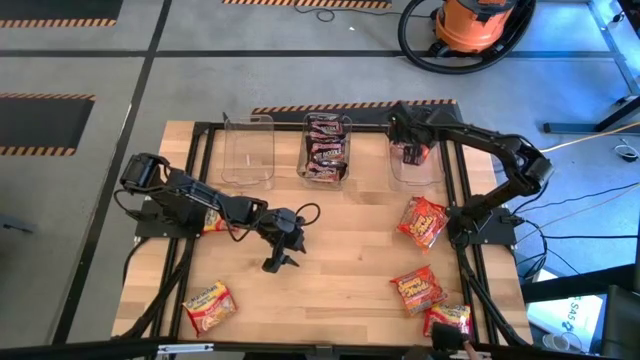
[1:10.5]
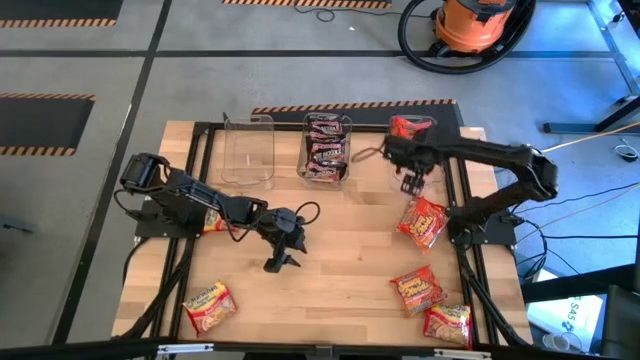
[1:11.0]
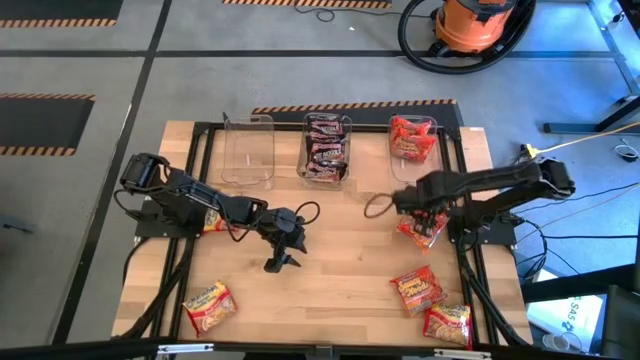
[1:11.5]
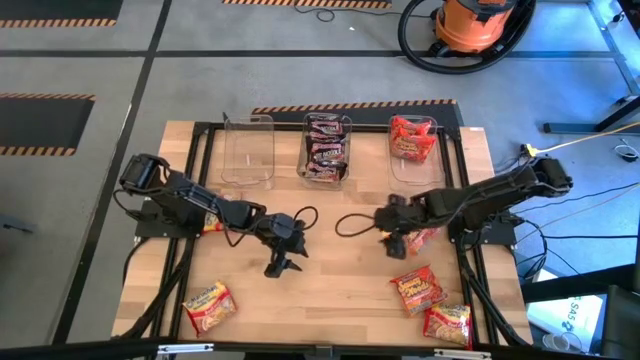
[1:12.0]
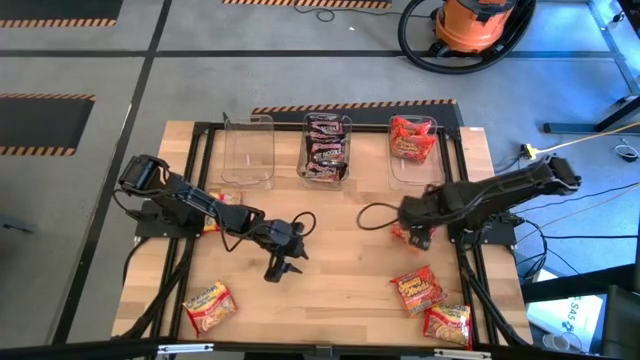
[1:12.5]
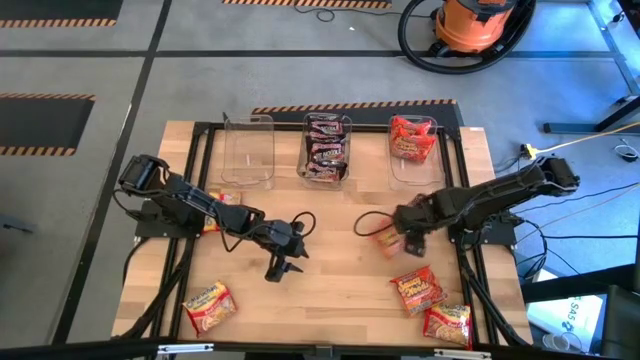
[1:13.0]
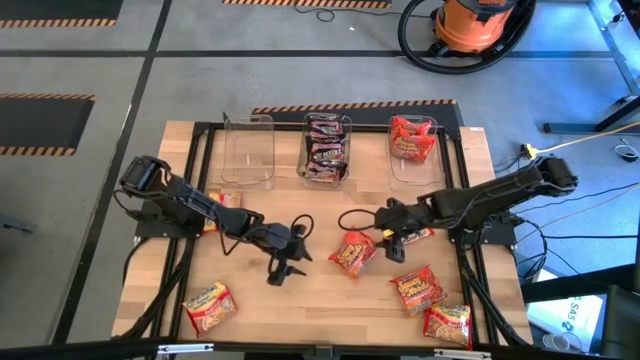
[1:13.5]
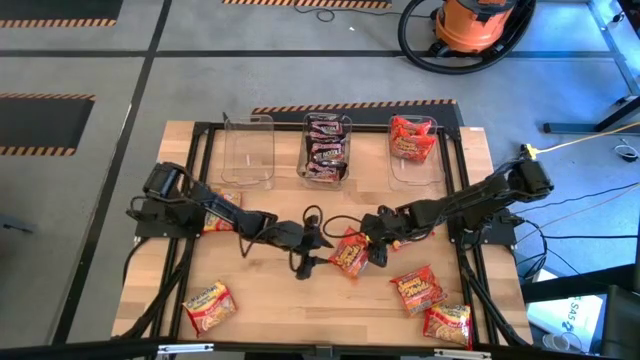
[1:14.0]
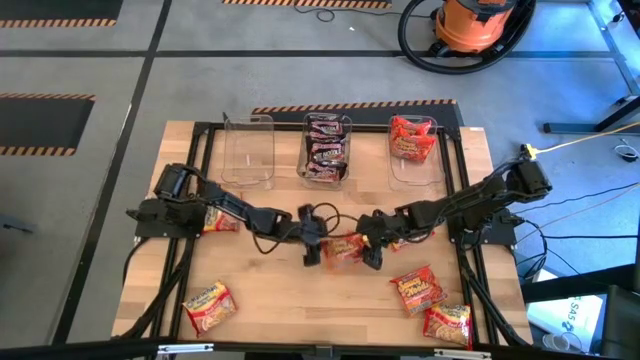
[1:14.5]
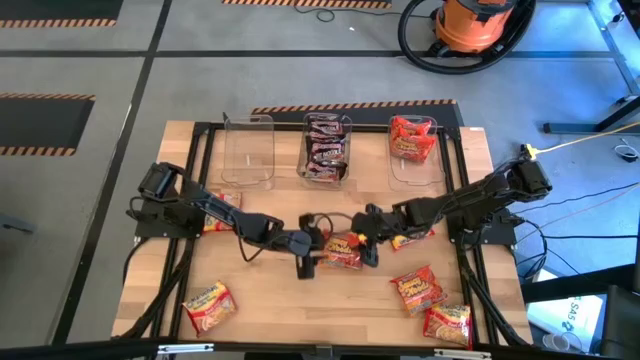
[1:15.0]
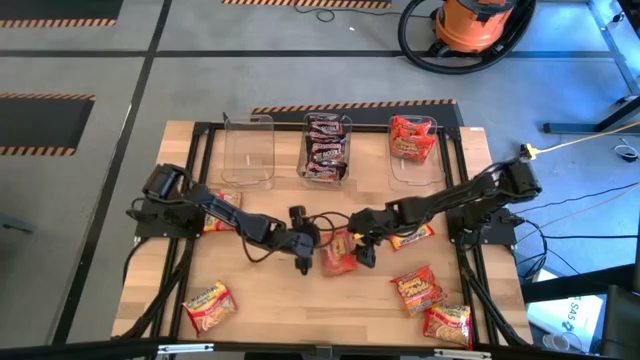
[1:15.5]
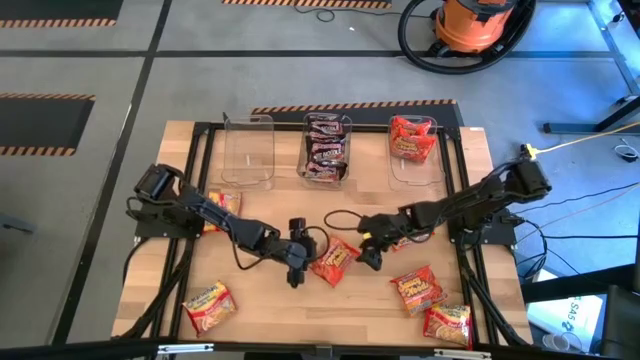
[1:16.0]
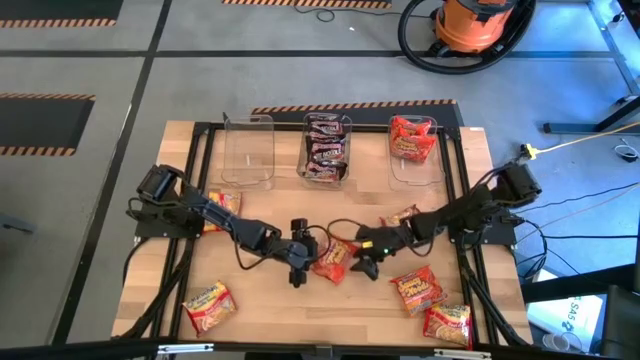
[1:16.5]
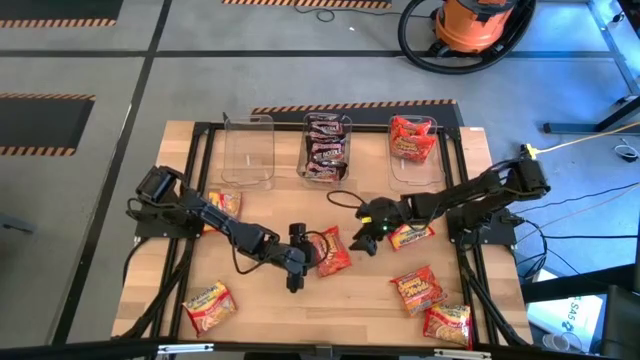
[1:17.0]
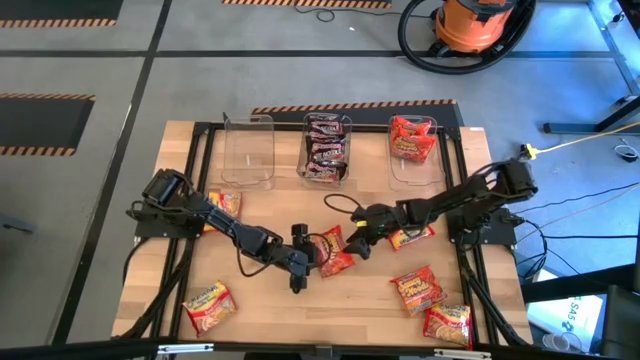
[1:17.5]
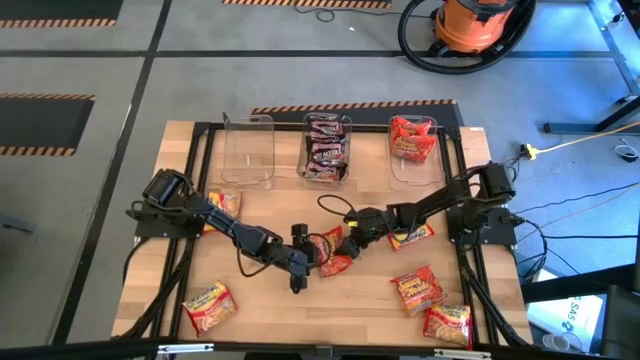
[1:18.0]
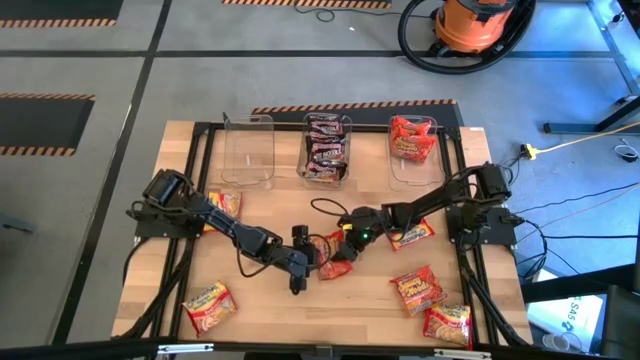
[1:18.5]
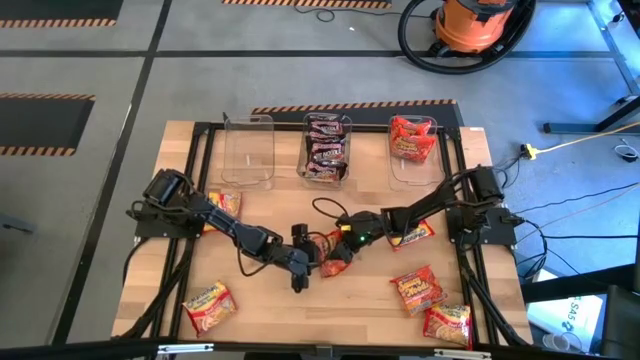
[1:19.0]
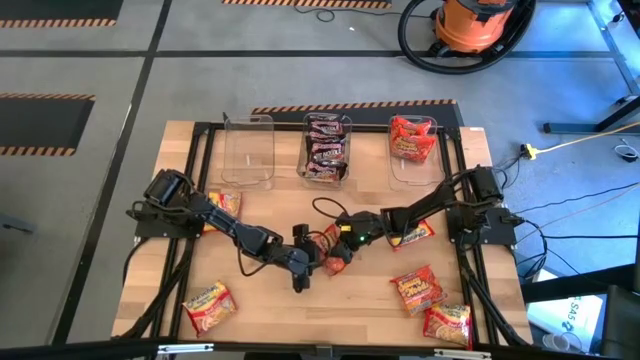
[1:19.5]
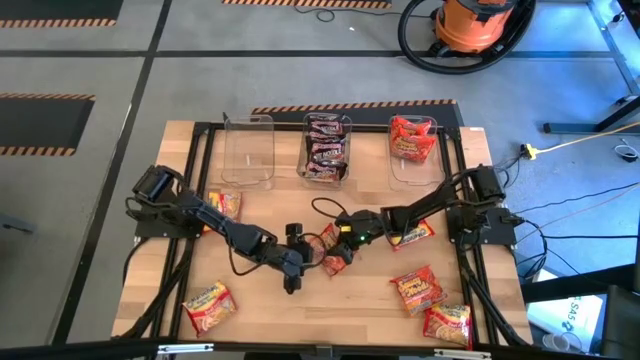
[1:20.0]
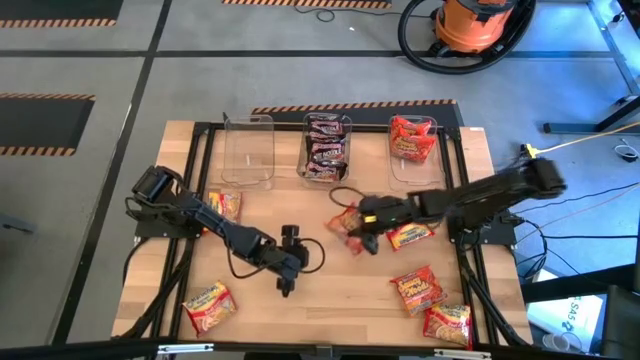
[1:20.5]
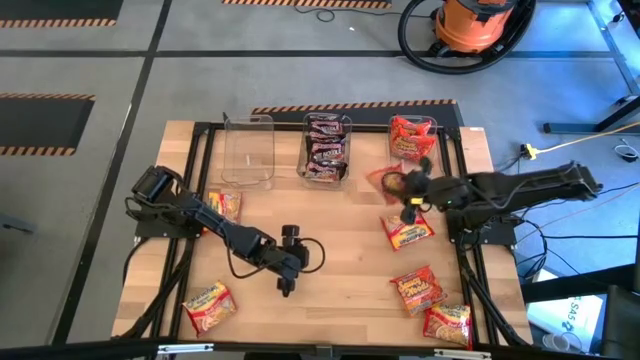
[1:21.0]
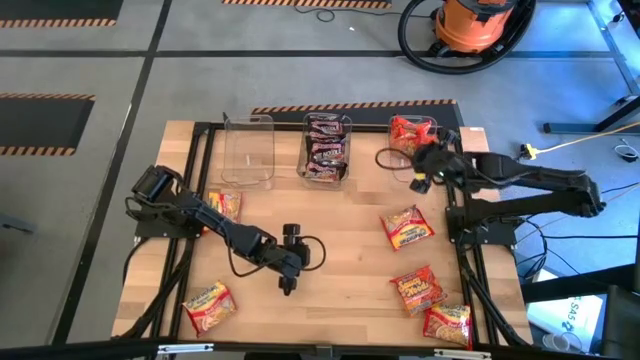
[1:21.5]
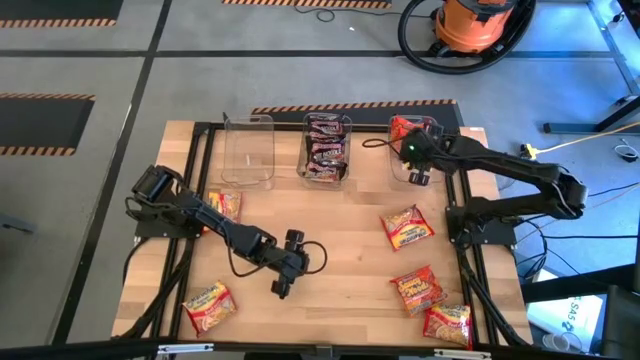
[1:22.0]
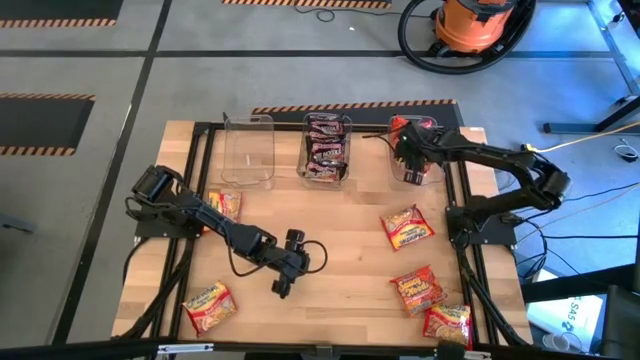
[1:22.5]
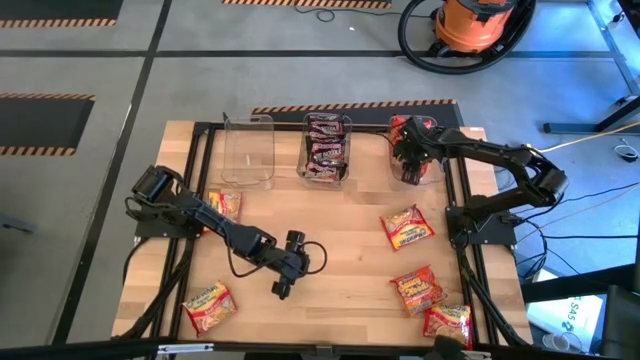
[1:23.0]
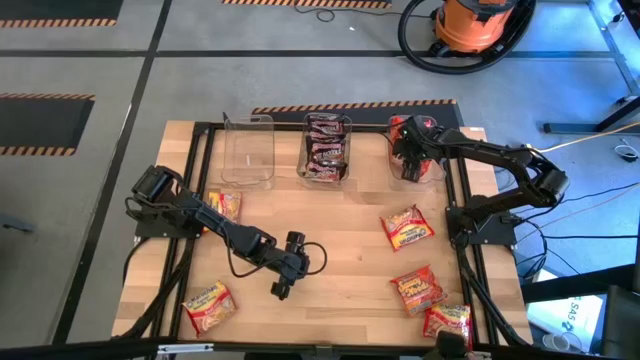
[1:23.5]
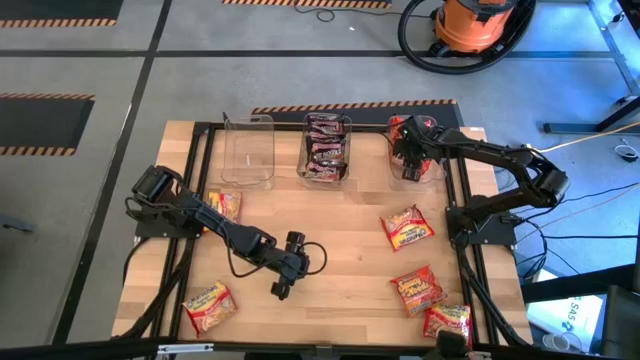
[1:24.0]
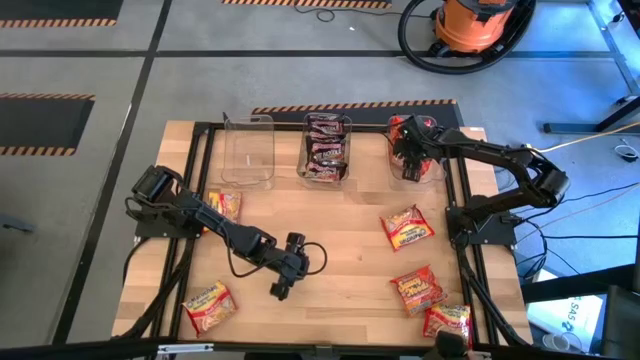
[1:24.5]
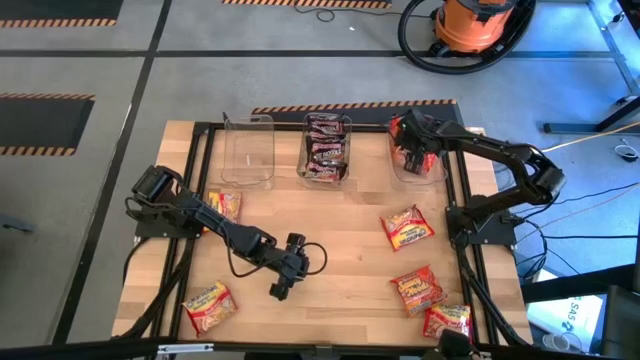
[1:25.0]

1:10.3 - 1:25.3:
Task: Sort Maruchan noodles
Put the orange noodle pack into the right transparent bin

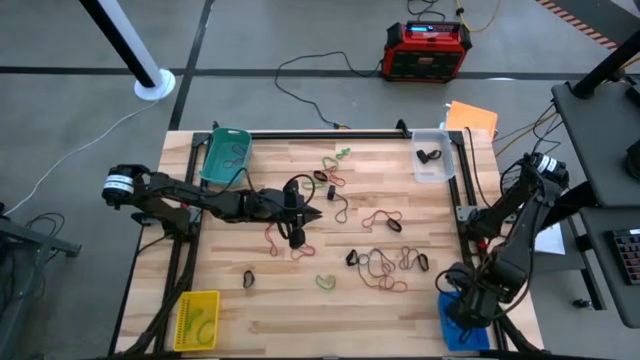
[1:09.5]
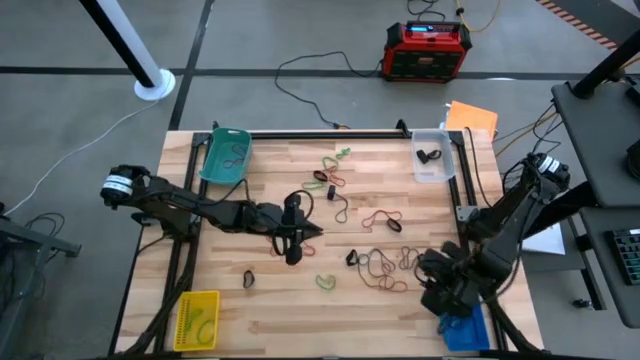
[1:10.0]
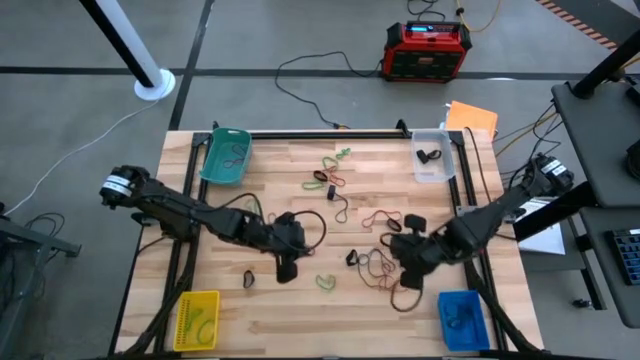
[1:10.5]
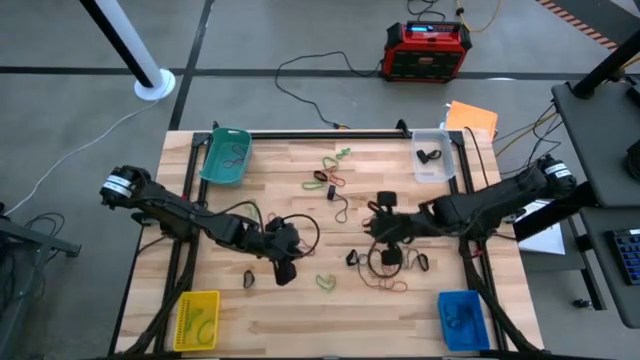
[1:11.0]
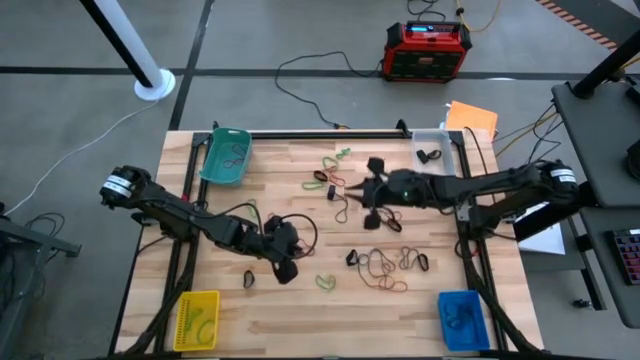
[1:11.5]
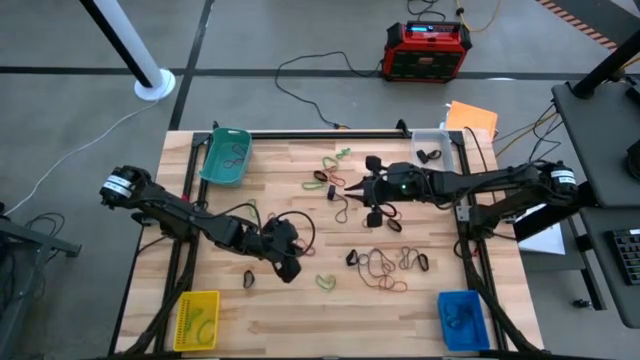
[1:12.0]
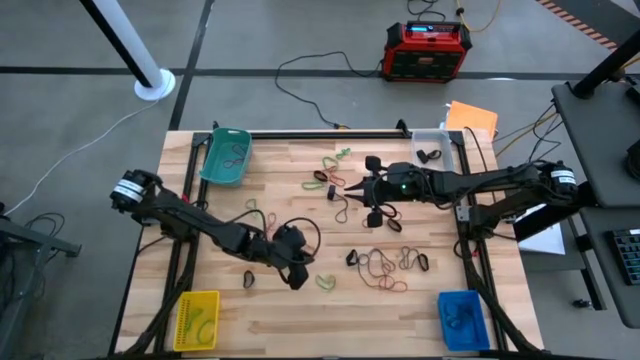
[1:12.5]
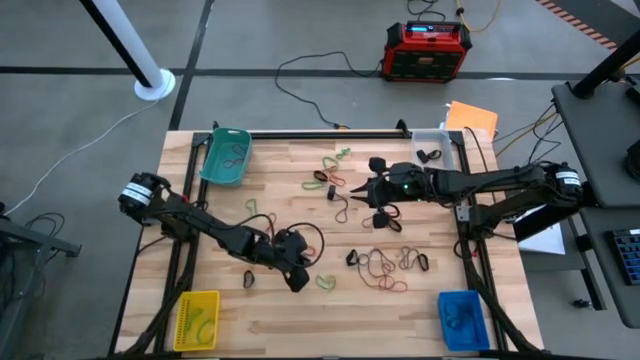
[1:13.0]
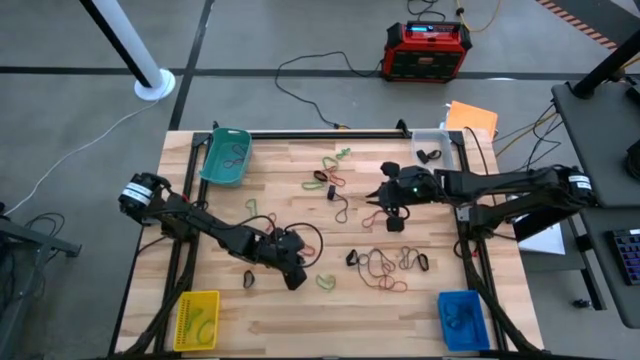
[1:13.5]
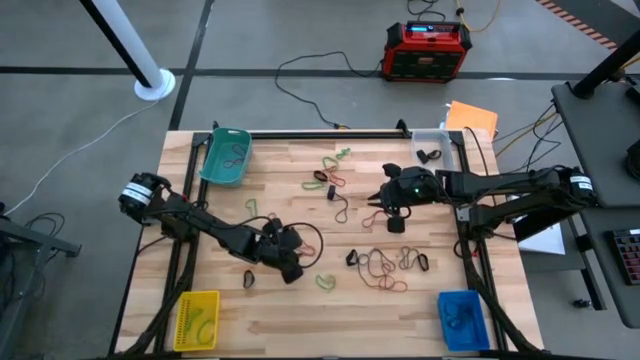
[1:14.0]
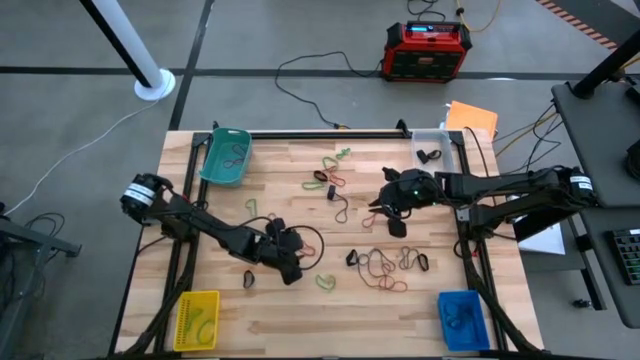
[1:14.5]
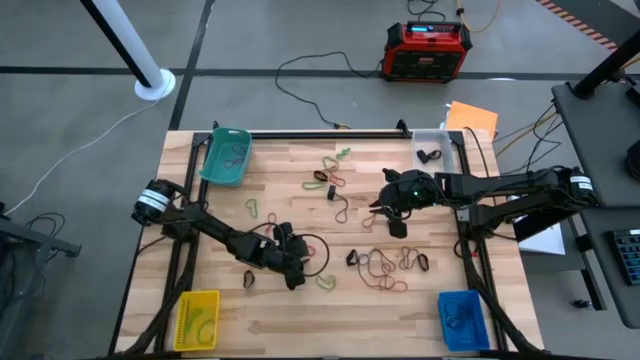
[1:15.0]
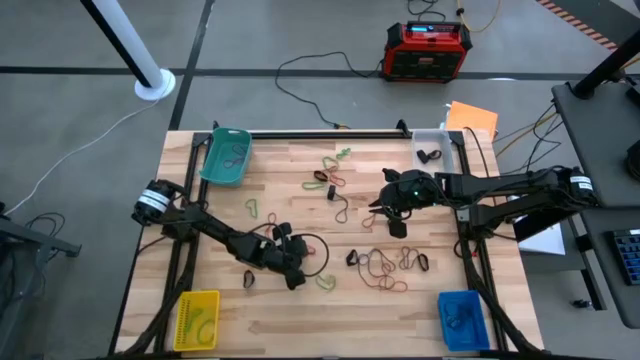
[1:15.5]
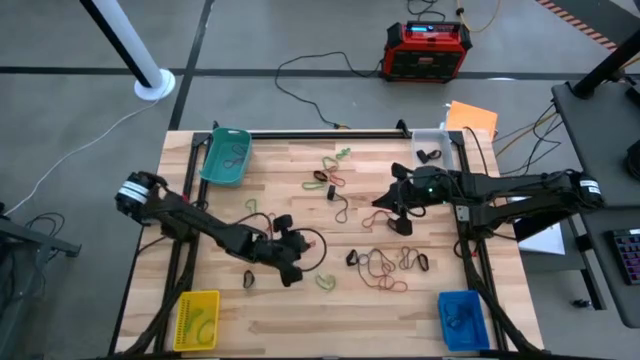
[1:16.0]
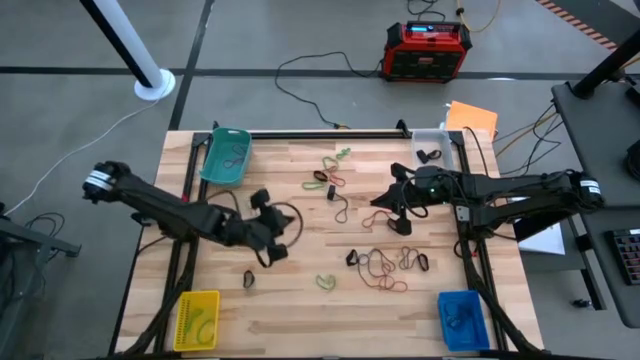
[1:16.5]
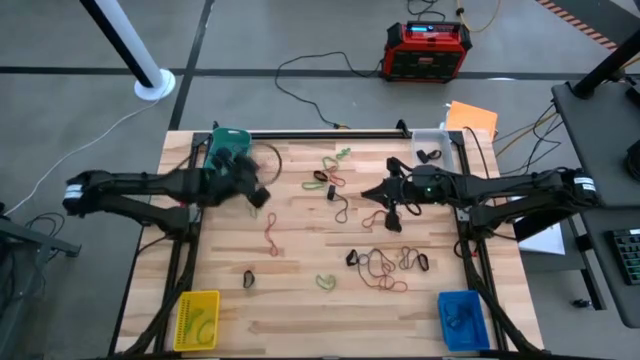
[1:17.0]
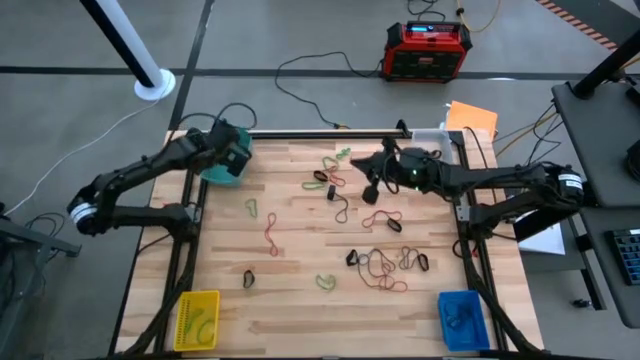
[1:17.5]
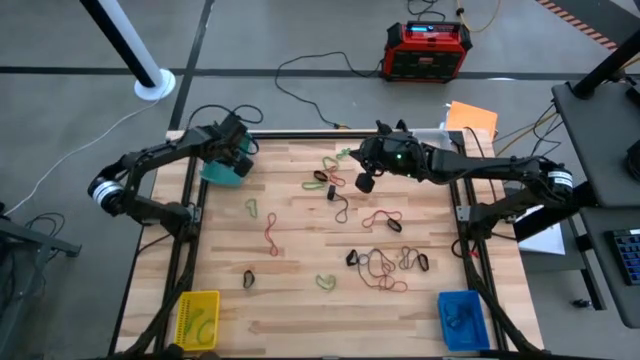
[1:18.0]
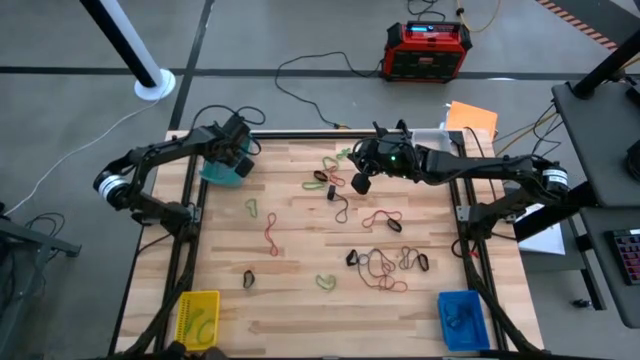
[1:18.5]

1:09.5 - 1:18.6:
Task: Sort rubber bands into baskets
Put the red rubber band into the green bin
